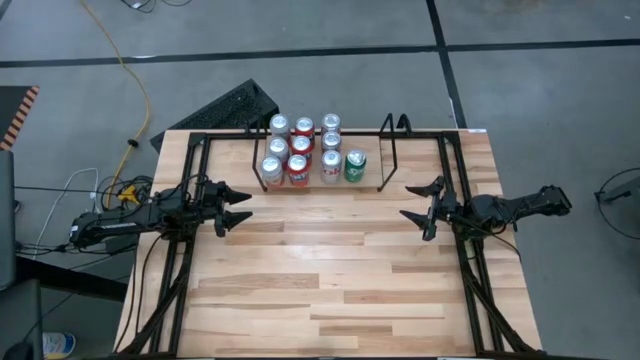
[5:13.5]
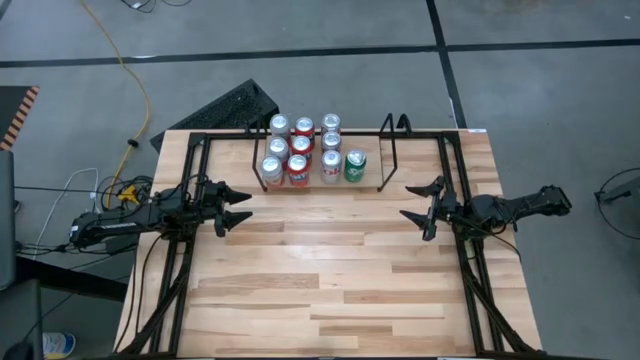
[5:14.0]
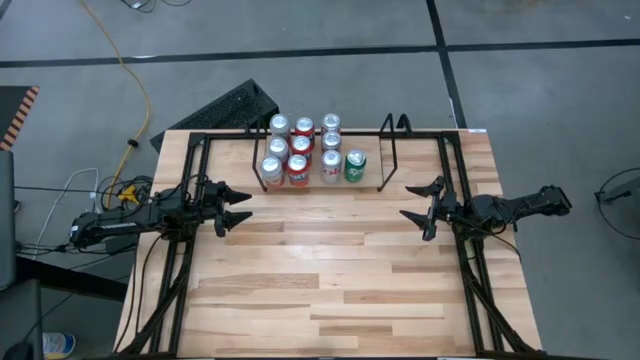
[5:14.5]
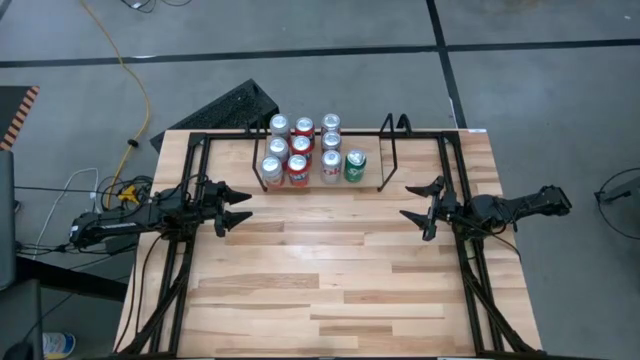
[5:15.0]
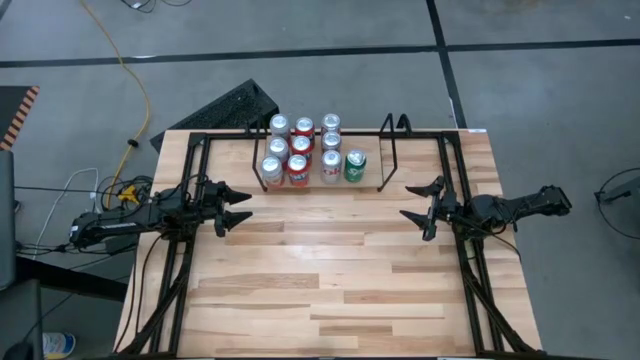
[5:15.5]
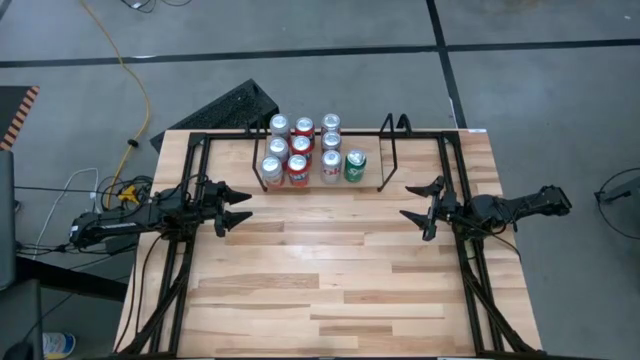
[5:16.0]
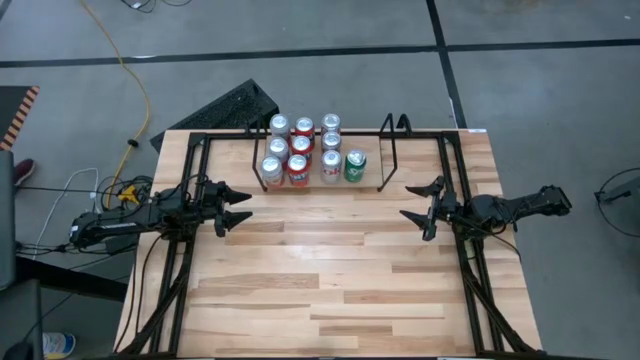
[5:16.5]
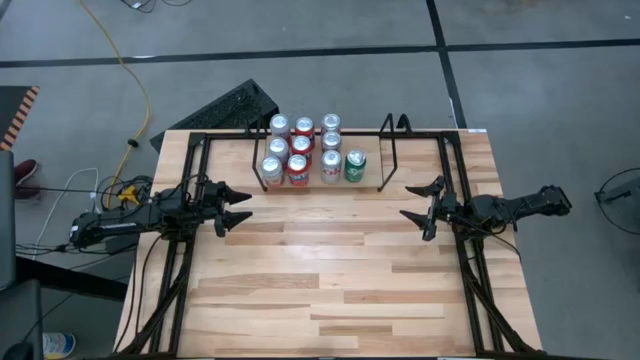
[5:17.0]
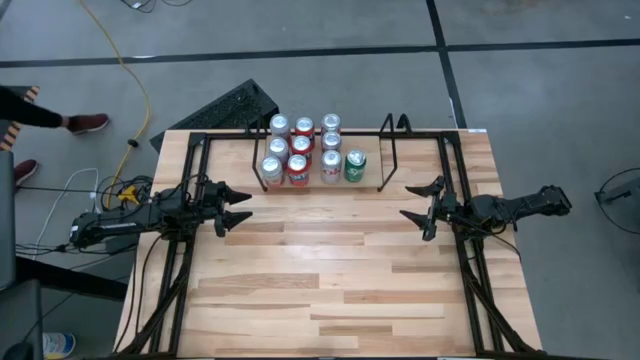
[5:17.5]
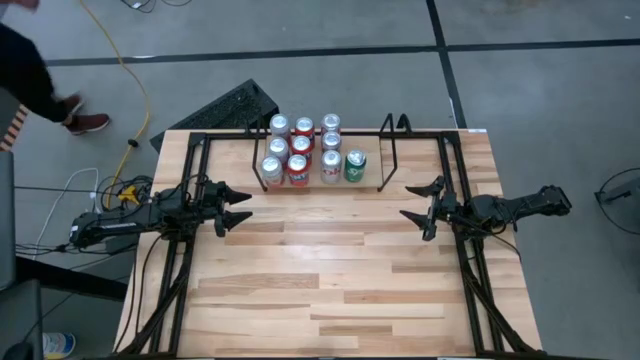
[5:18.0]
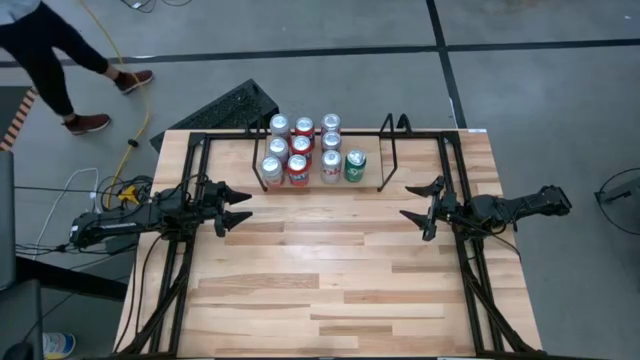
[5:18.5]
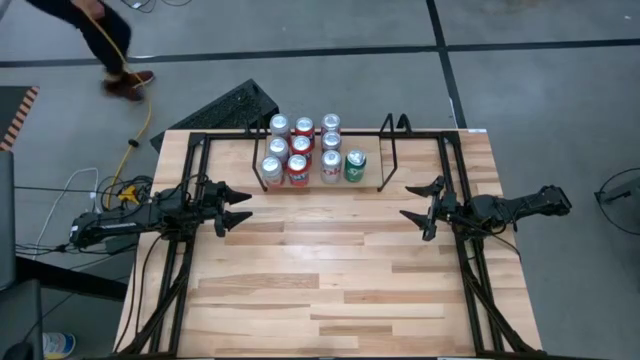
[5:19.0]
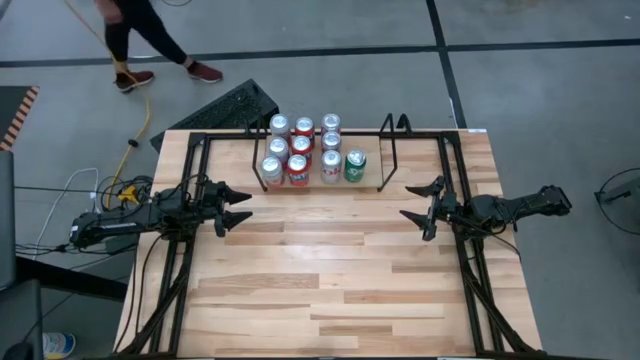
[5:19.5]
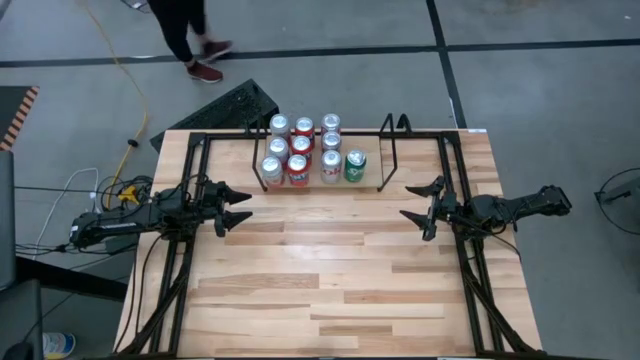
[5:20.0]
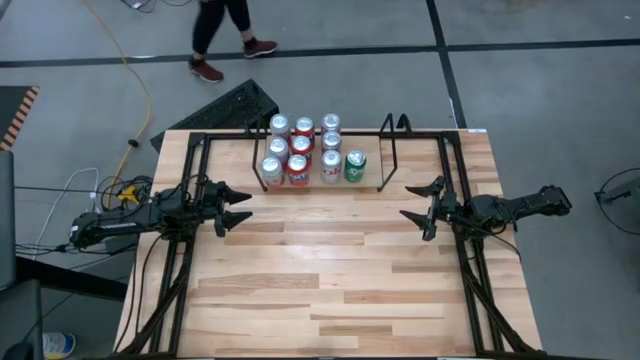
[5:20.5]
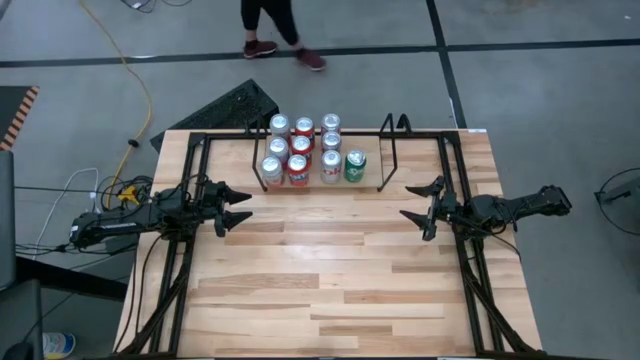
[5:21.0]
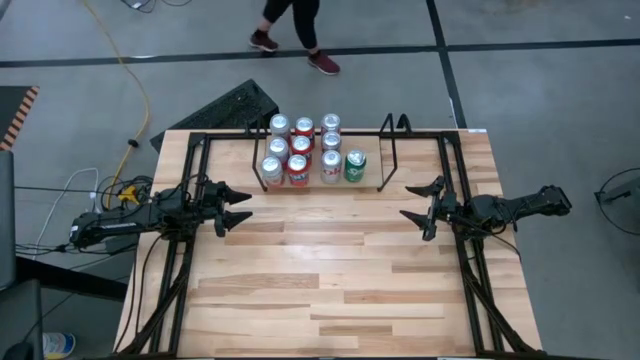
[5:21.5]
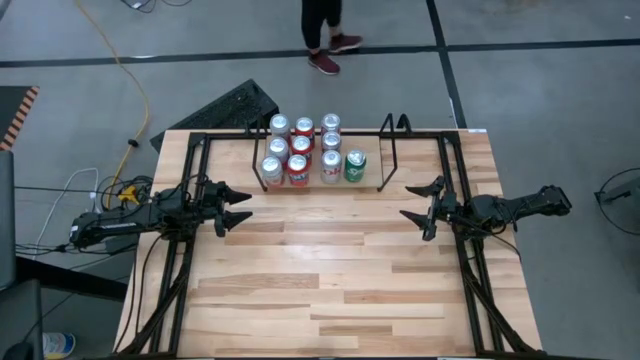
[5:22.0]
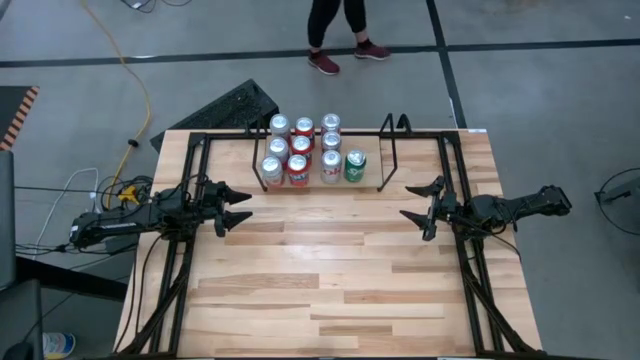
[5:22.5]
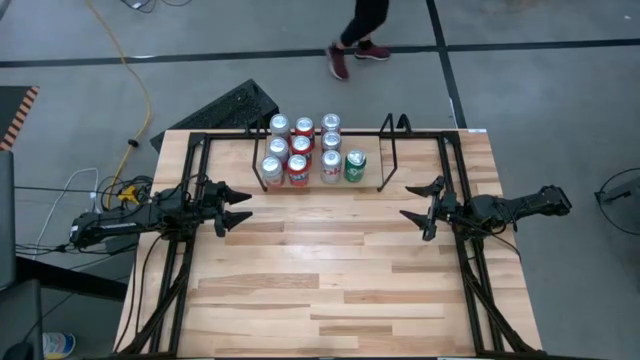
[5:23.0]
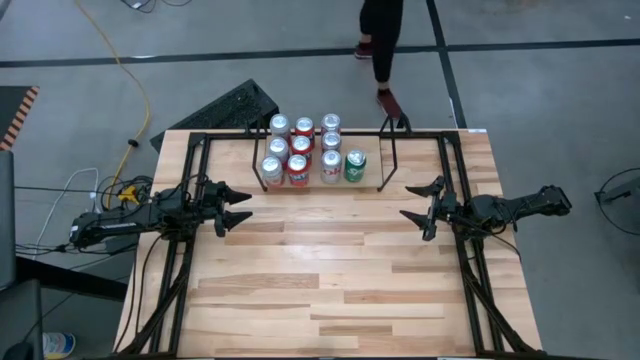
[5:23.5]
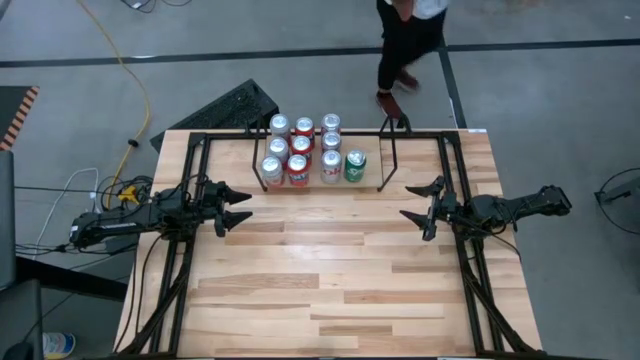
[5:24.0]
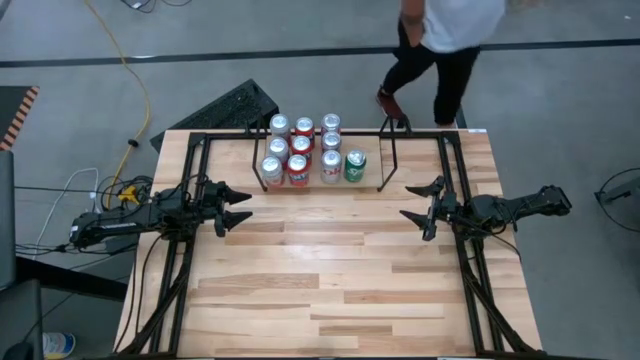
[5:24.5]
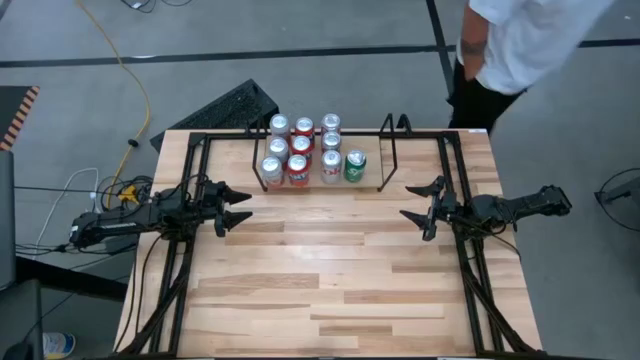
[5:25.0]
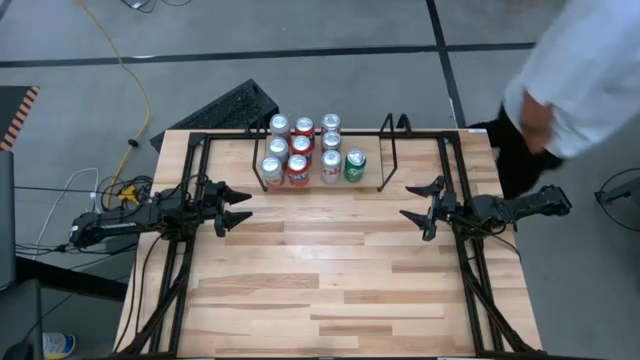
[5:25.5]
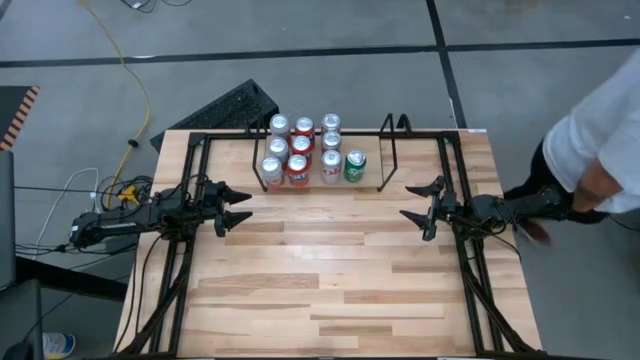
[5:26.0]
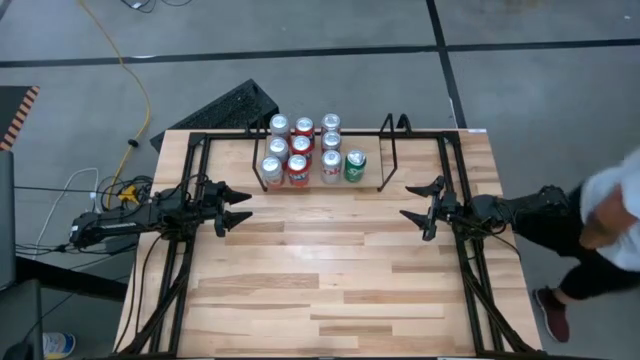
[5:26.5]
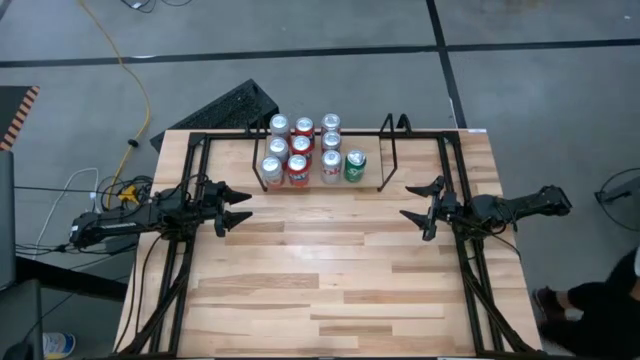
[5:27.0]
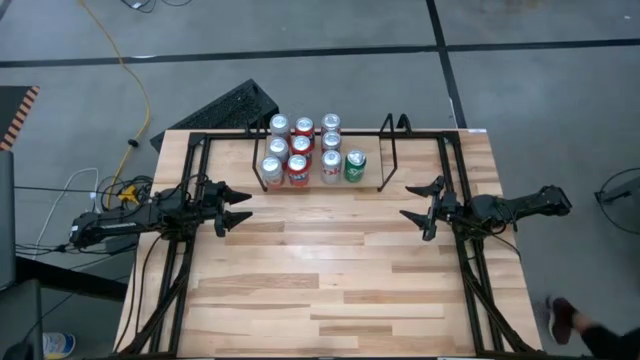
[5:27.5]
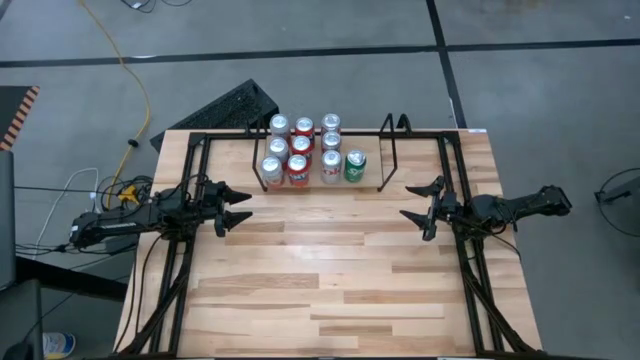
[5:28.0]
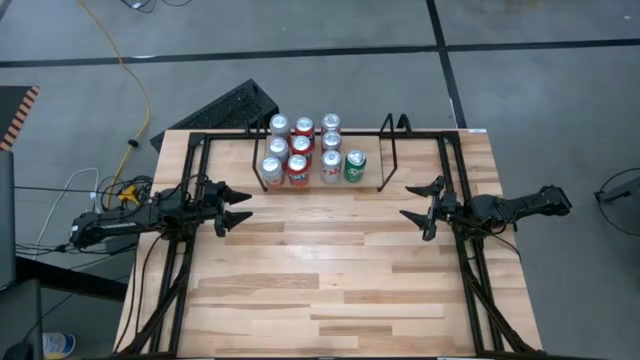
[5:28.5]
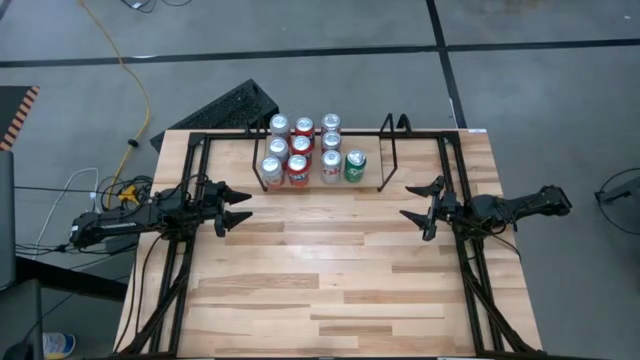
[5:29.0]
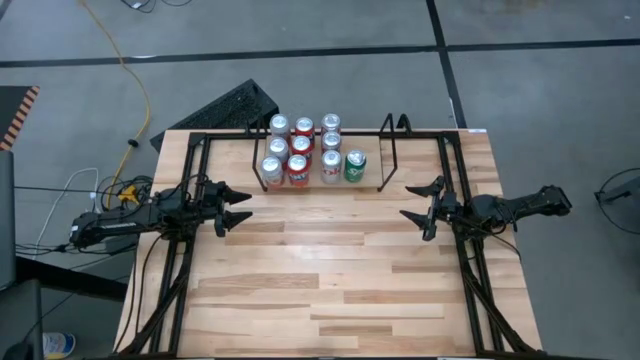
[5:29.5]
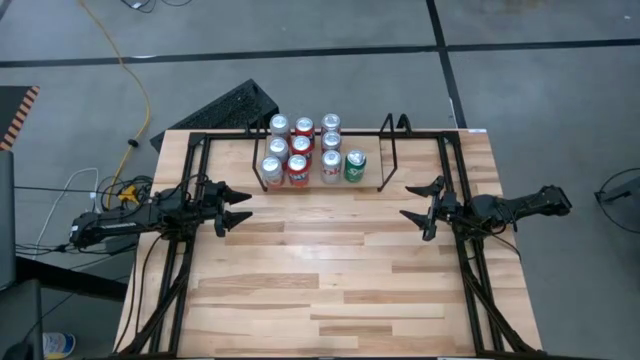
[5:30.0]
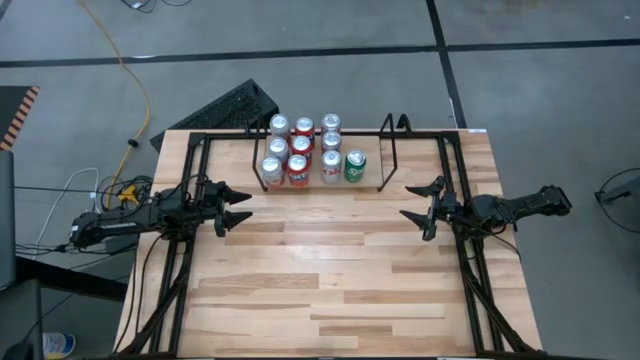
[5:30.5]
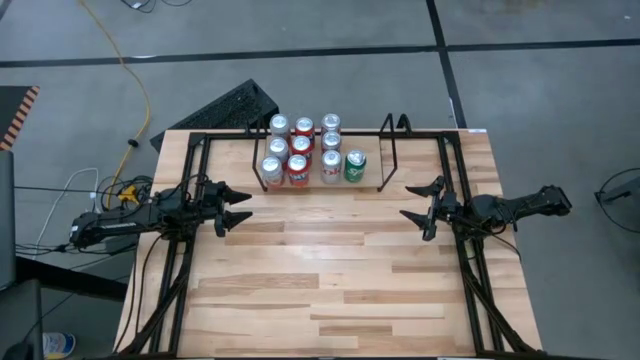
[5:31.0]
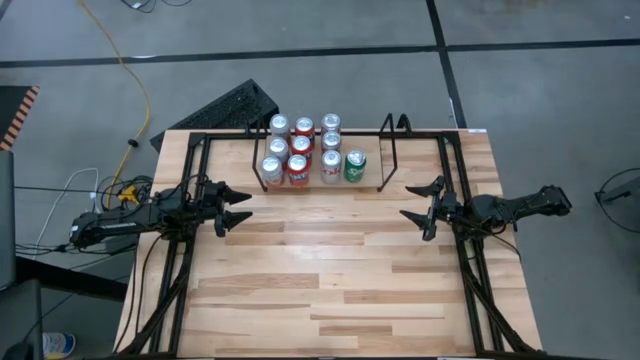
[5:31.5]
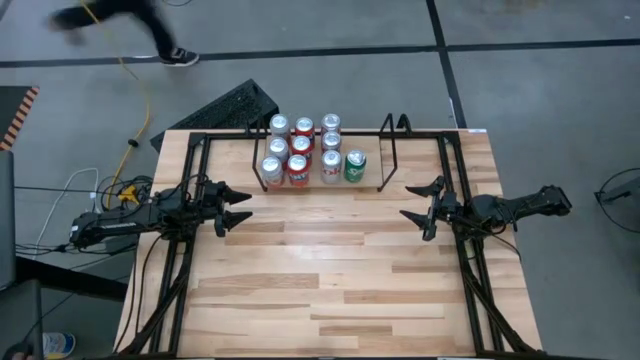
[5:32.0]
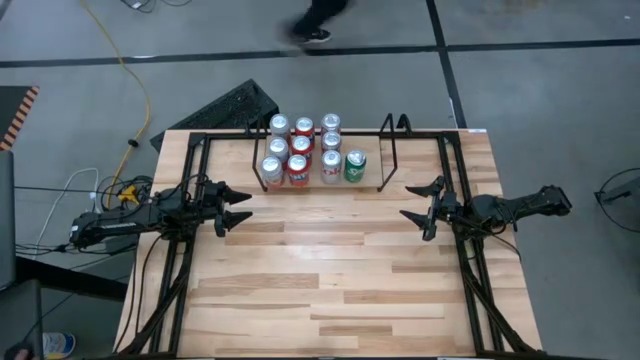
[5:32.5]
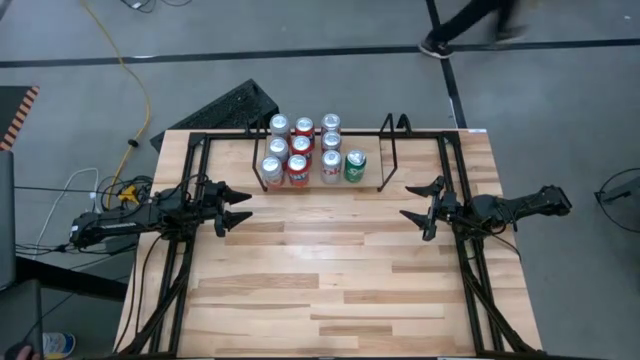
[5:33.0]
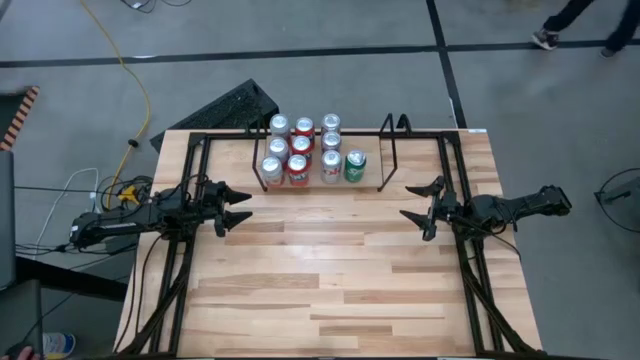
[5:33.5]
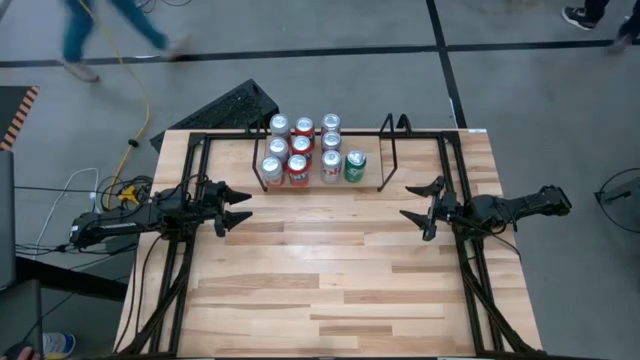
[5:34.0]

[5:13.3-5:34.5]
Task: Place canned beverage on shelf
Return to Home Position
